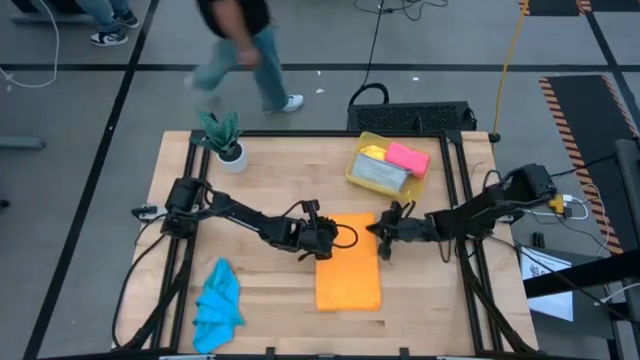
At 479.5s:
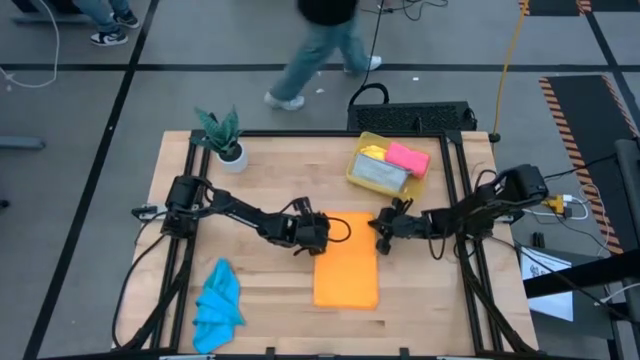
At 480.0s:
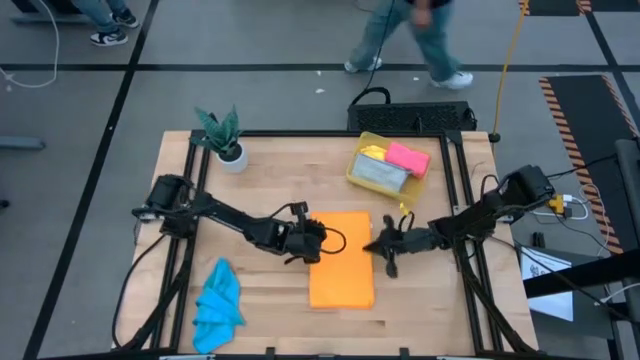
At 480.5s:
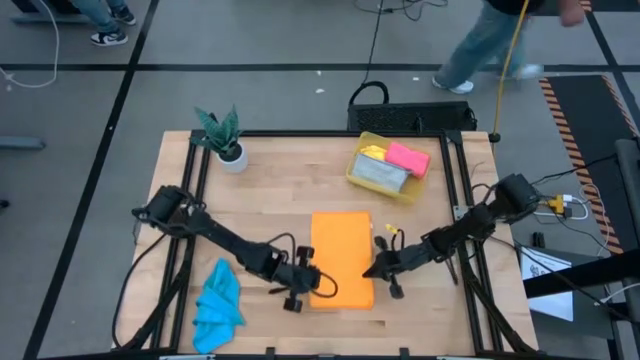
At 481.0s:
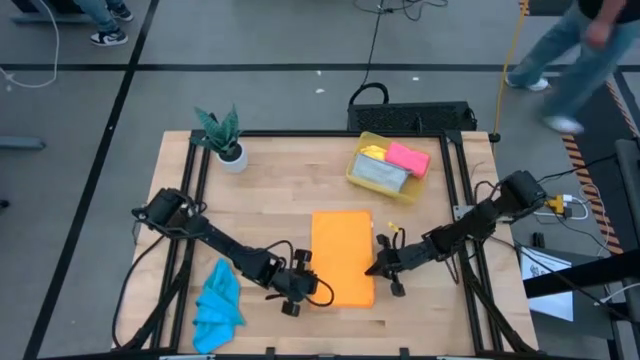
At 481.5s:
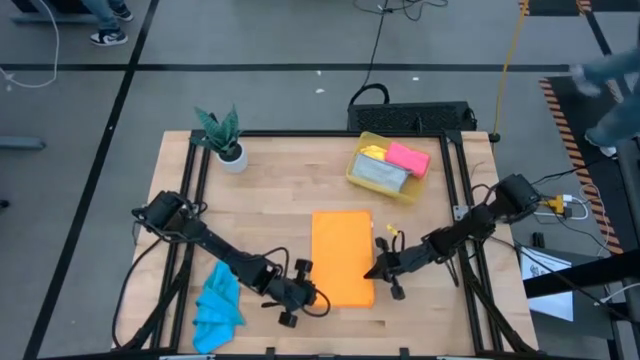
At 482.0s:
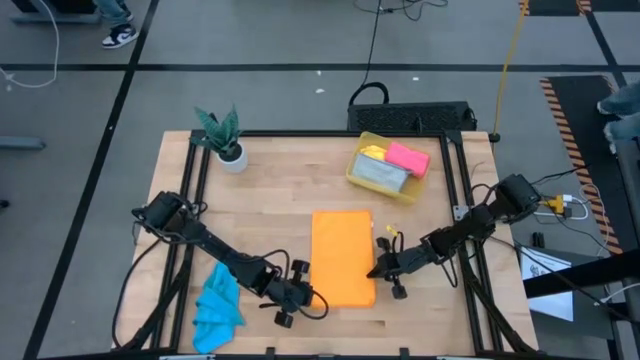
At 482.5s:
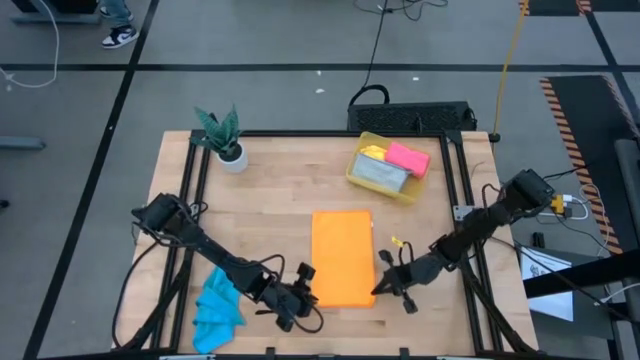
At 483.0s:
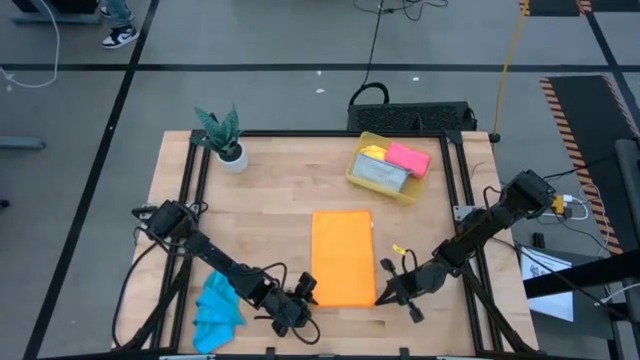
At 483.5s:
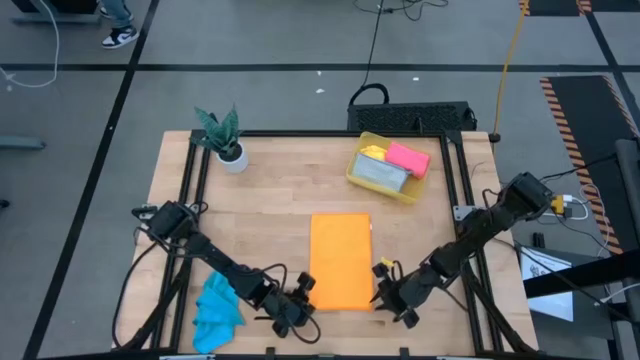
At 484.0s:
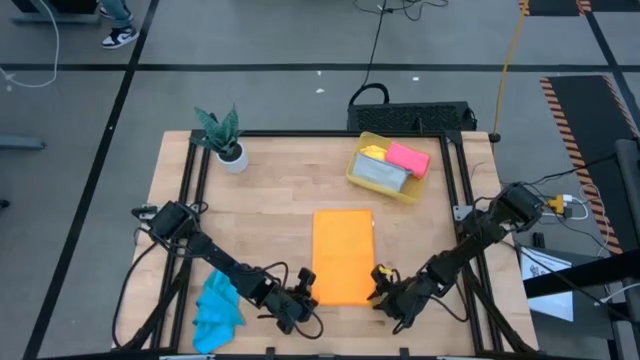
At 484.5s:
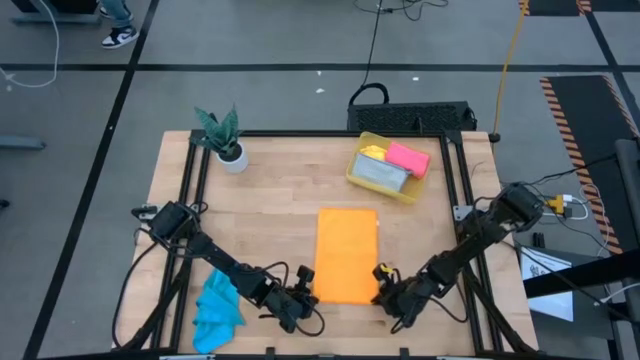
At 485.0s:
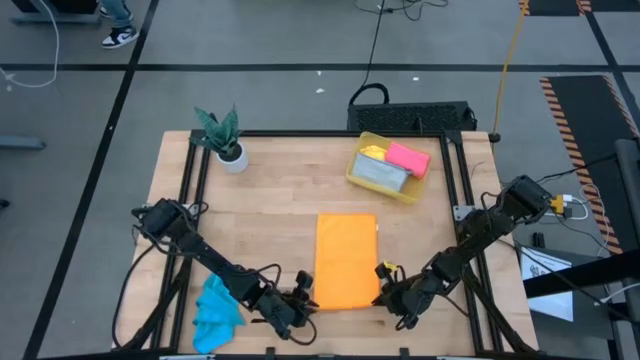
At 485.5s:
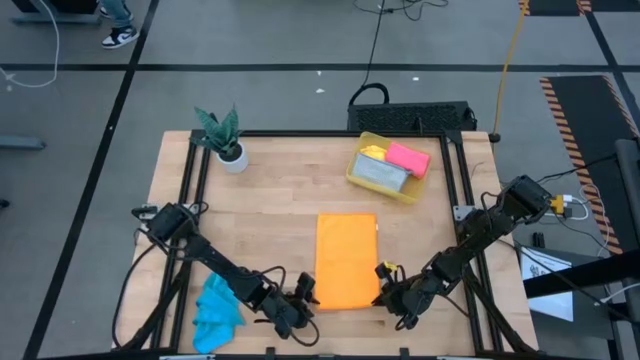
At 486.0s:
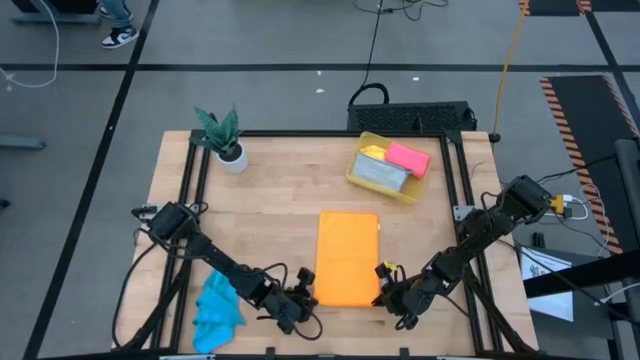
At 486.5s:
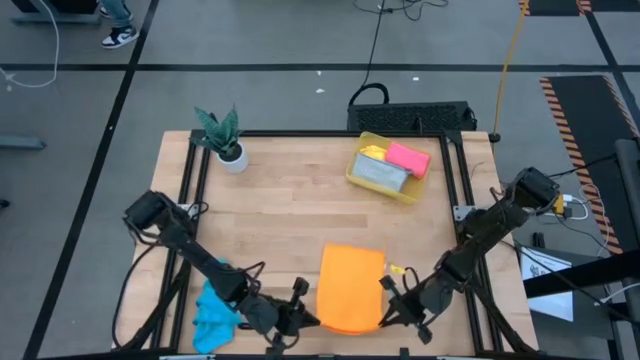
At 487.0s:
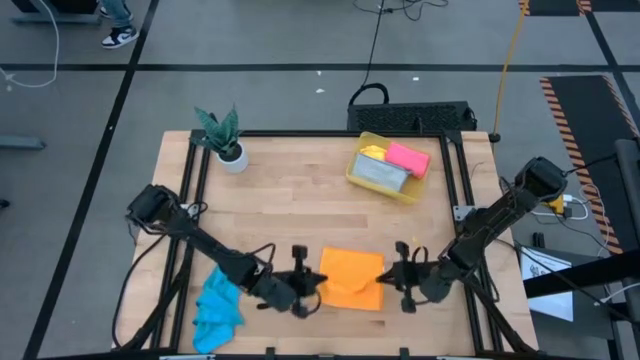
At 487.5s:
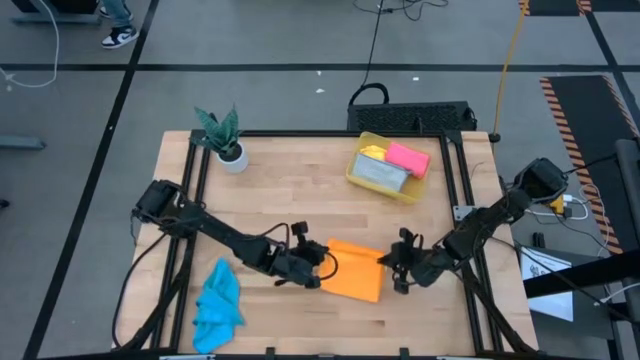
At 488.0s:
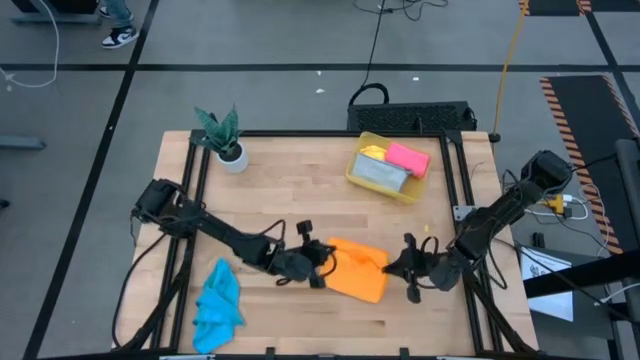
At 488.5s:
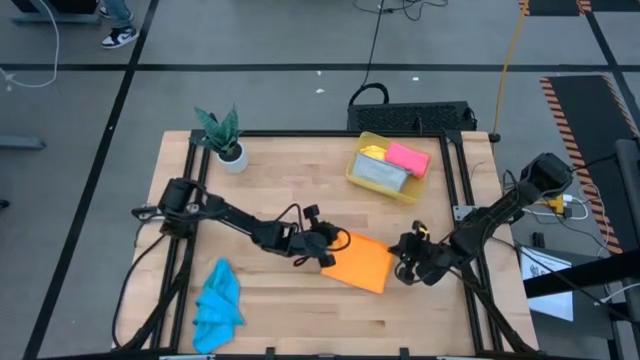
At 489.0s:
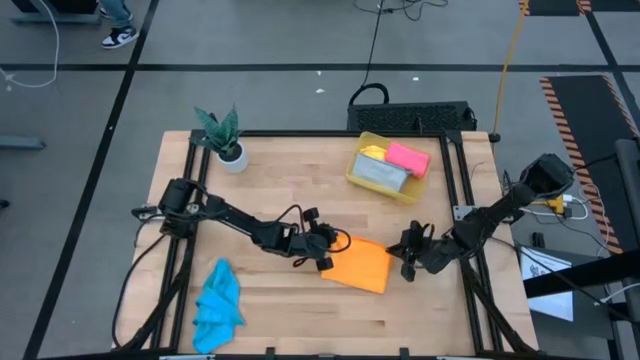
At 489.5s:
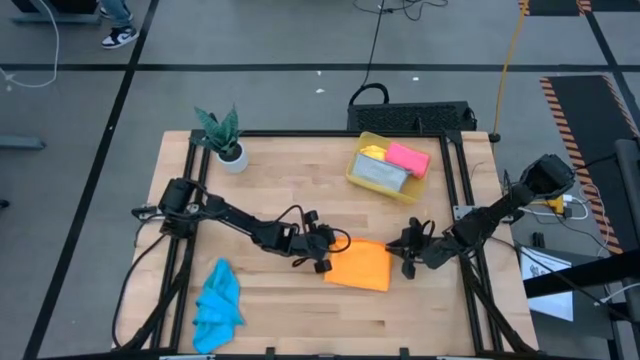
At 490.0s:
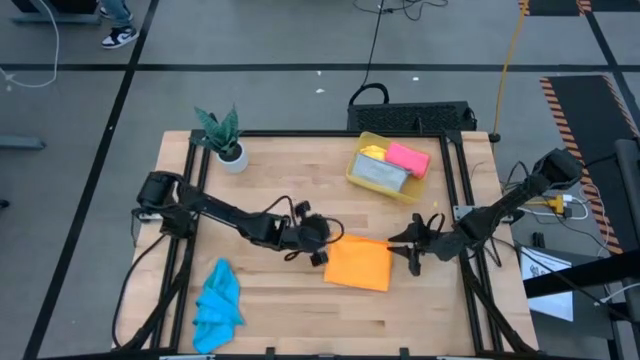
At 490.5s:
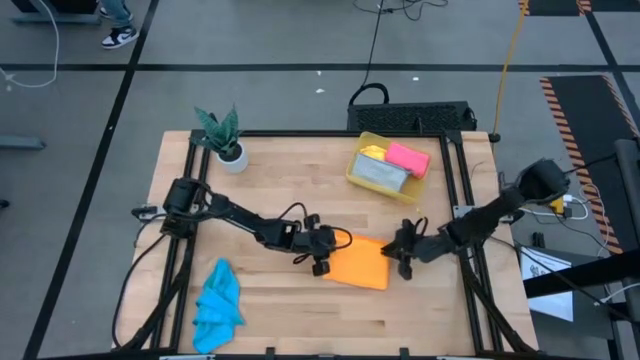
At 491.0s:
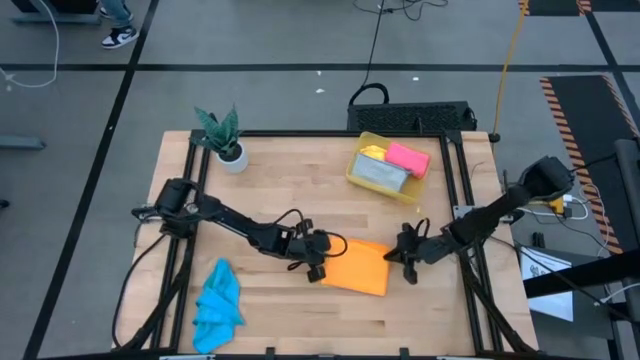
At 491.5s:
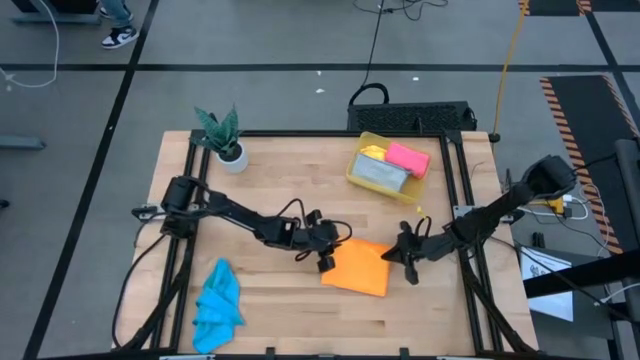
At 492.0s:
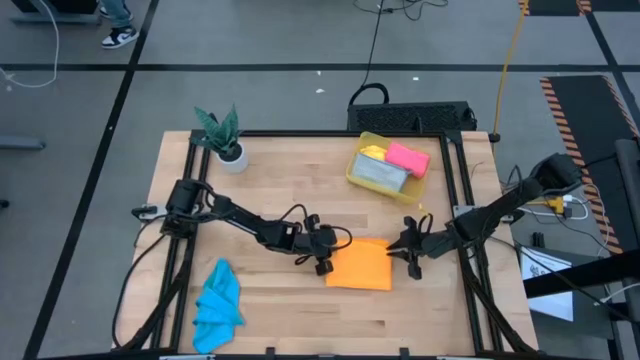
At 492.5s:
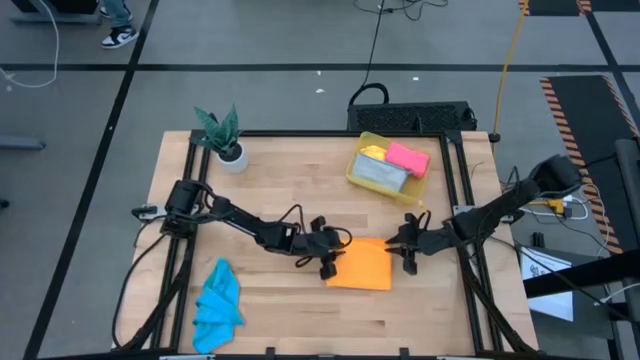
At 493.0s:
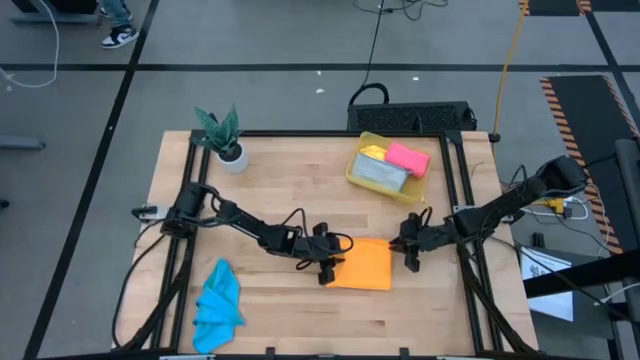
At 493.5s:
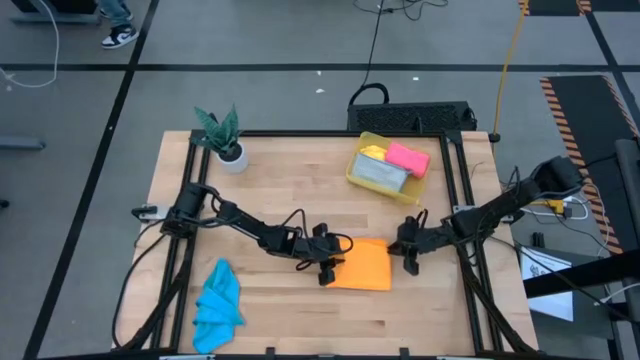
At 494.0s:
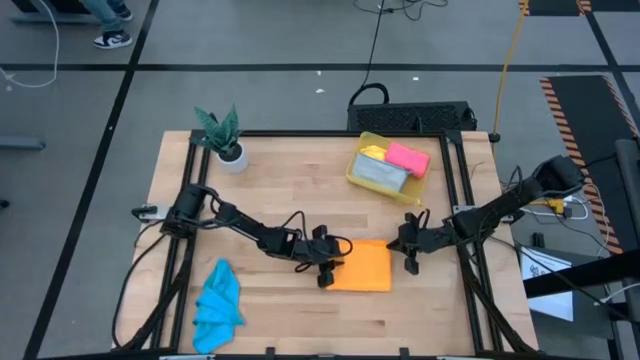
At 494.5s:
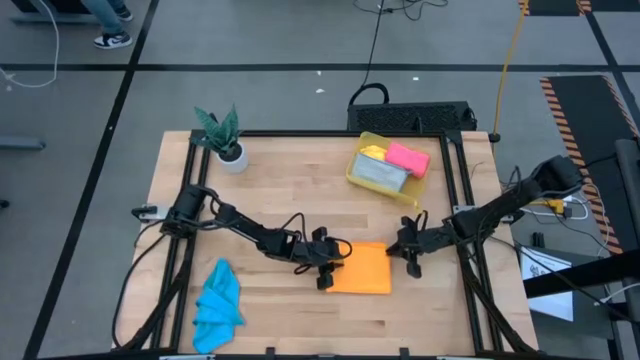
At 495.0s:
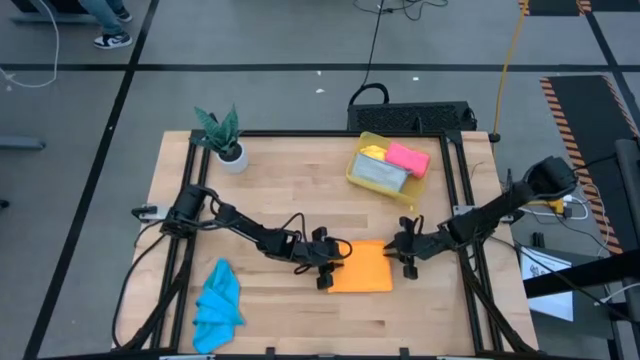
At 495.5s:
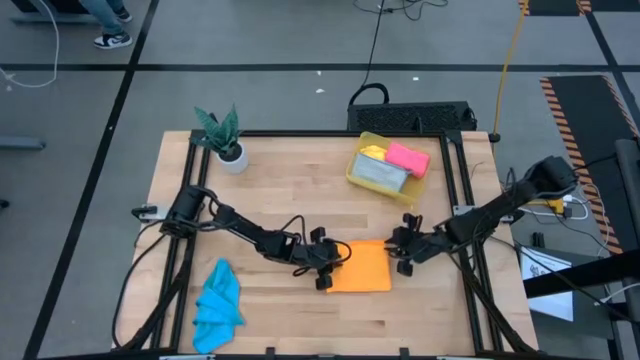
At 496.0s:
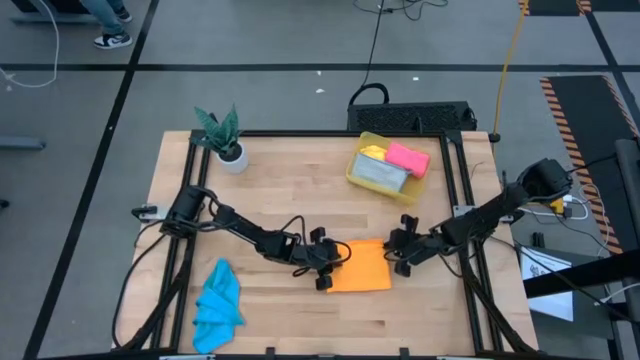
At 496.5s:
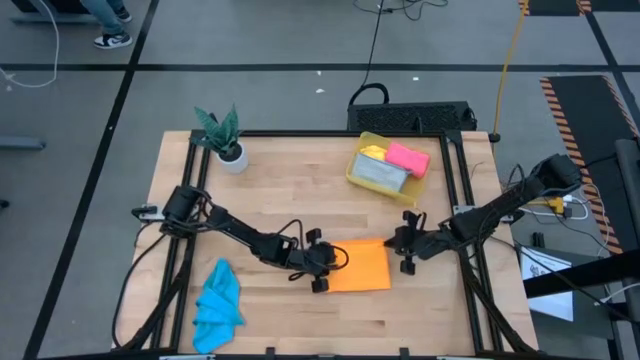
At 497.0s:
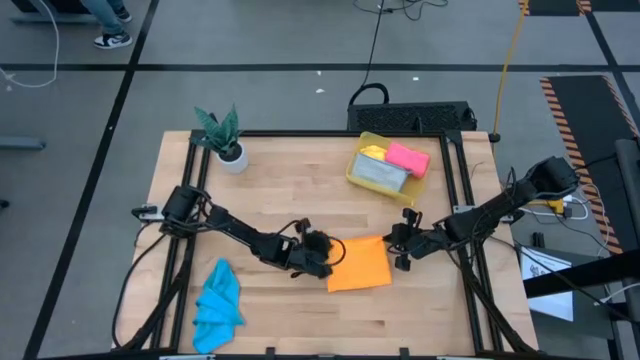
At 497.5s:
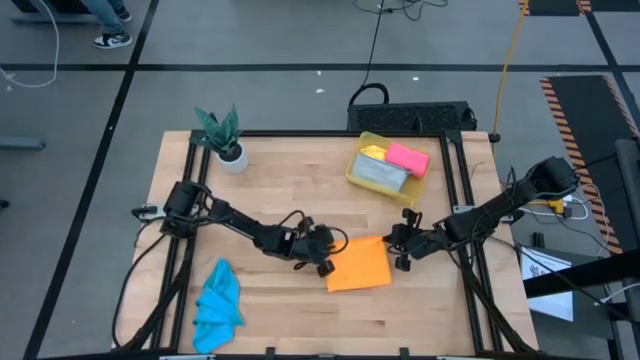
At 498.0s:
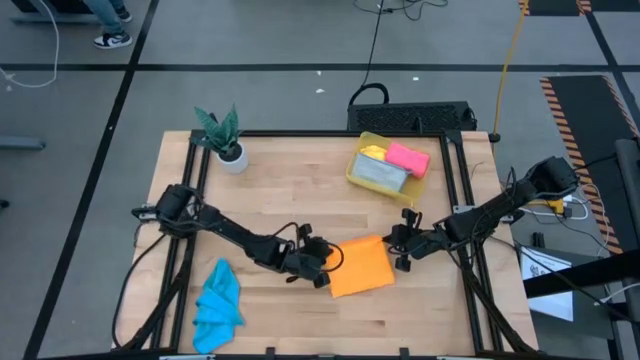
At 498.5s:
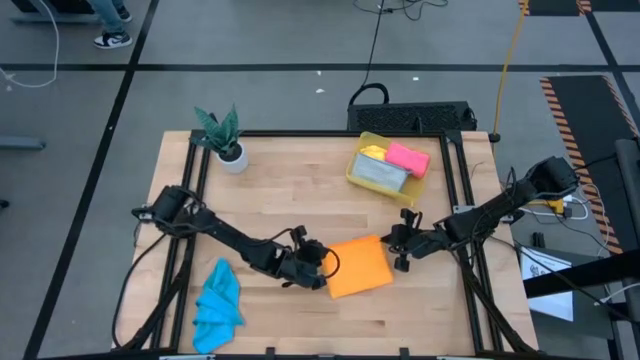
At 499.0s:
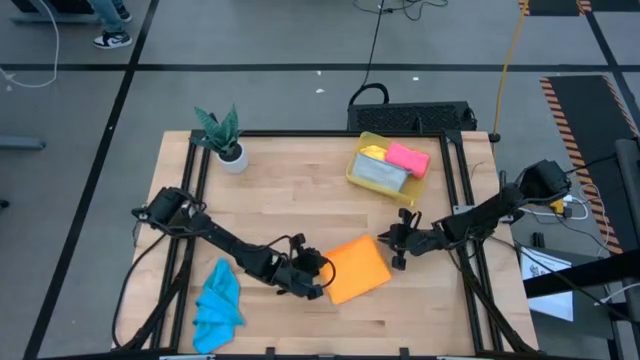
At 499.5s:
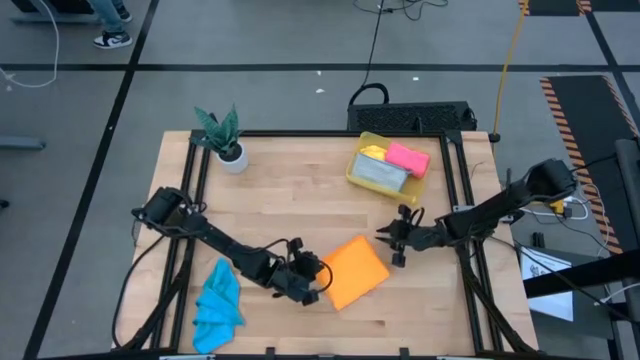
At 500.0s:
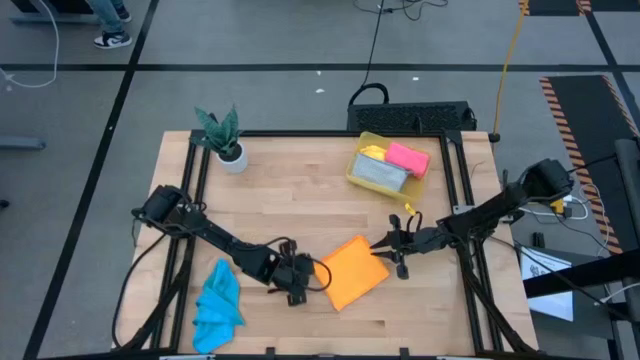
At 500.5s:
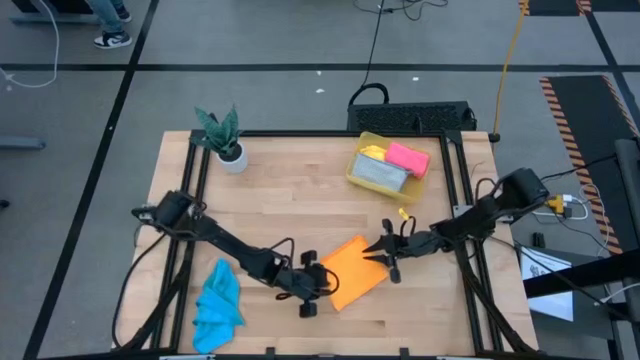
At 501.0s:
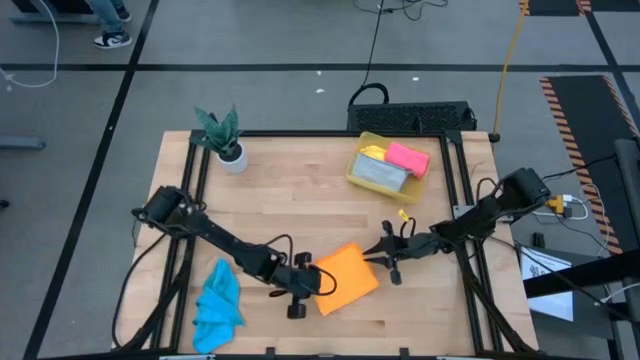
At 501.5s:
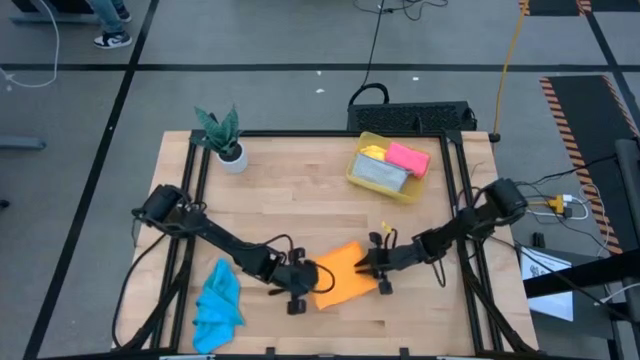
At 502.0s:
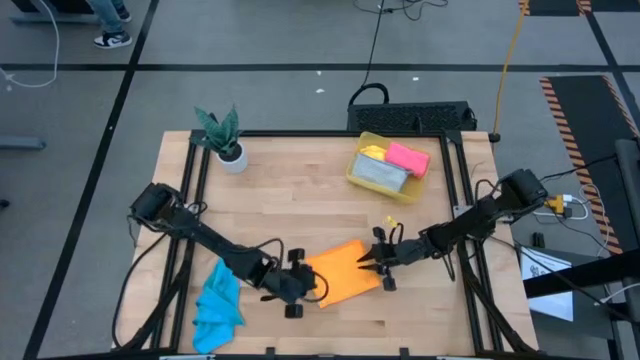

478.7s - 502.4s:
Task: Fold microfiber towels
Fold the orange kitchen towel
